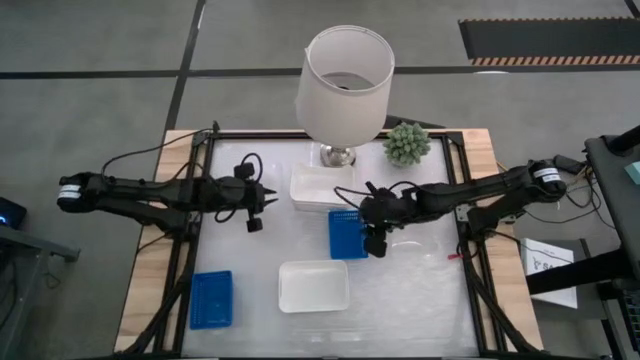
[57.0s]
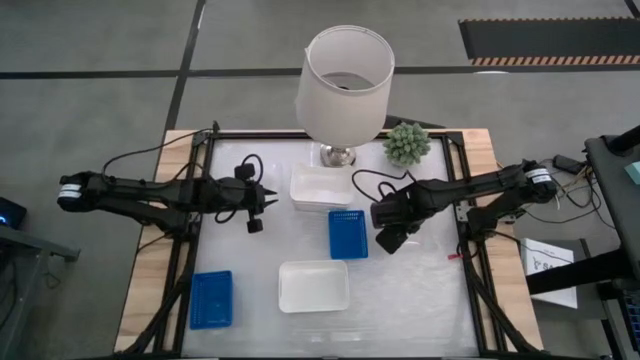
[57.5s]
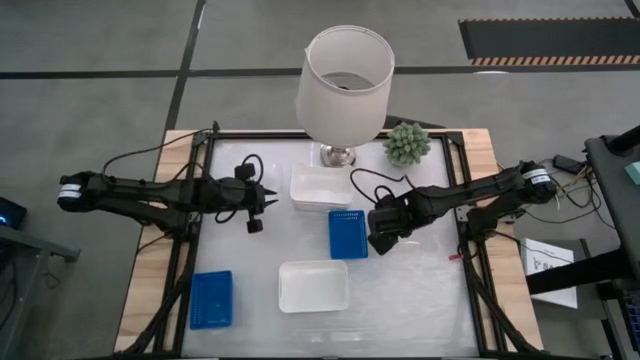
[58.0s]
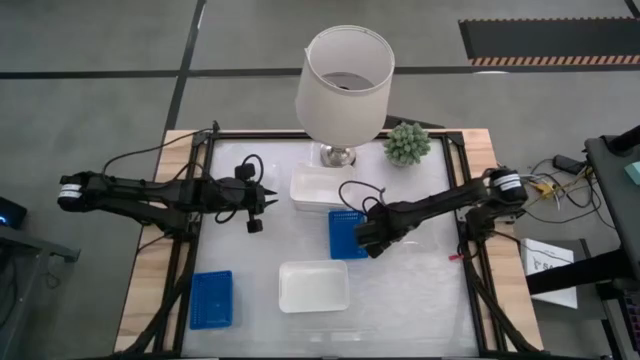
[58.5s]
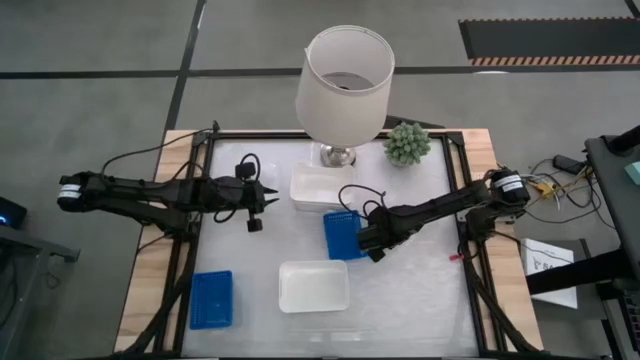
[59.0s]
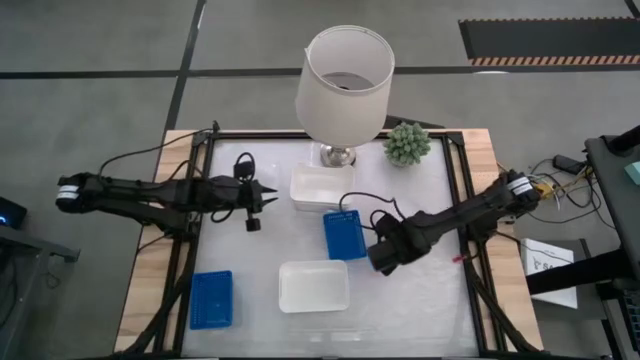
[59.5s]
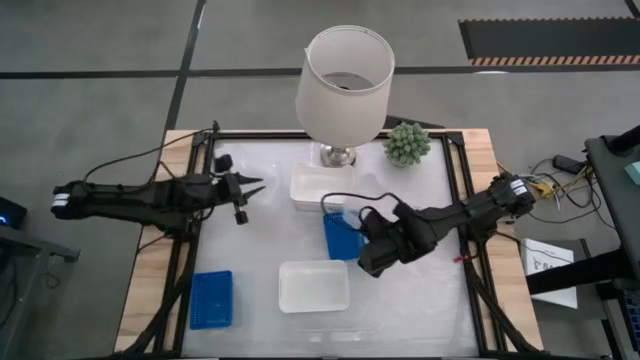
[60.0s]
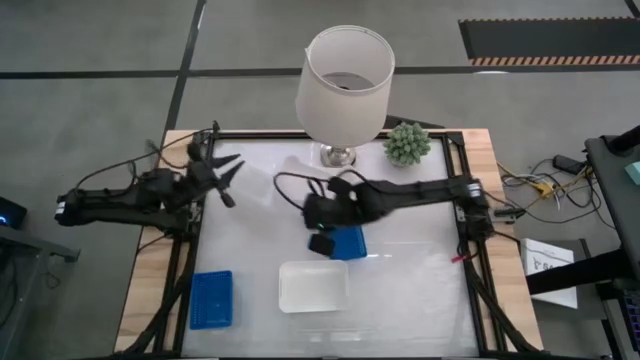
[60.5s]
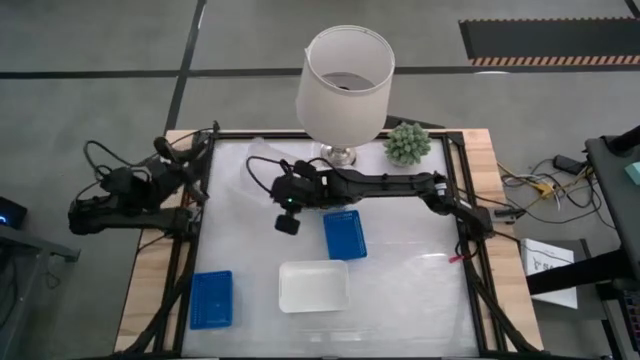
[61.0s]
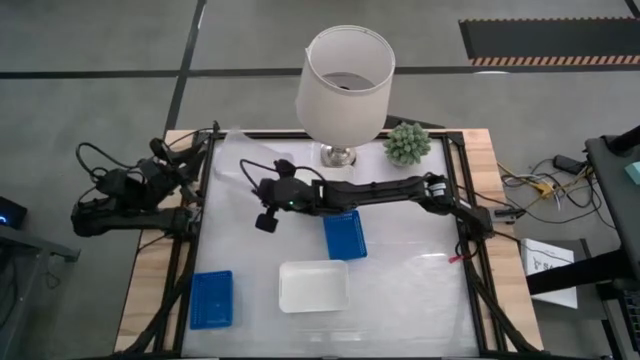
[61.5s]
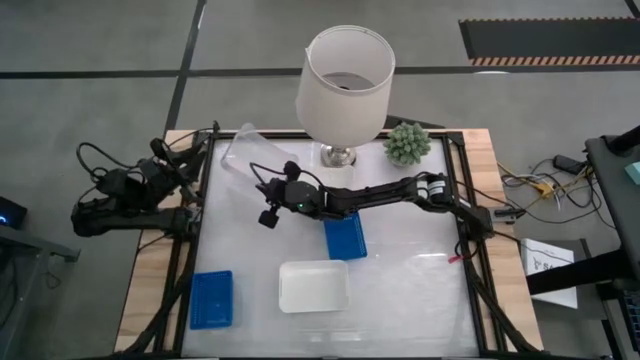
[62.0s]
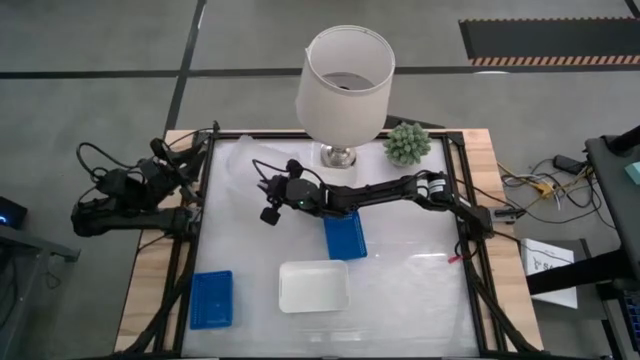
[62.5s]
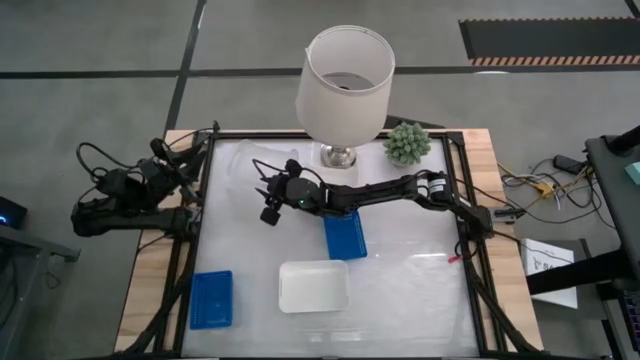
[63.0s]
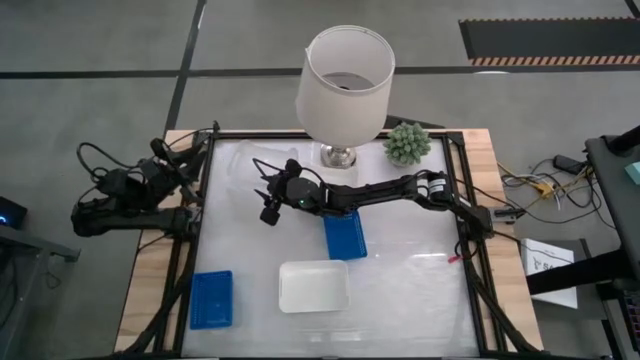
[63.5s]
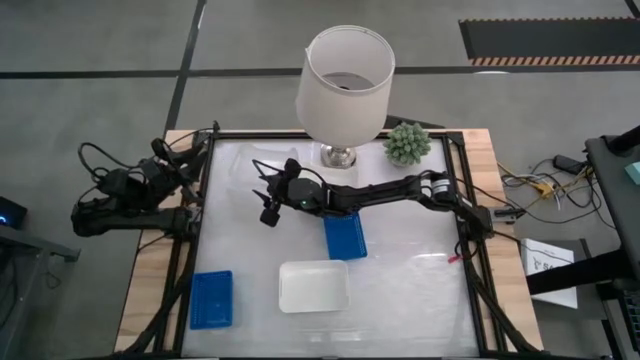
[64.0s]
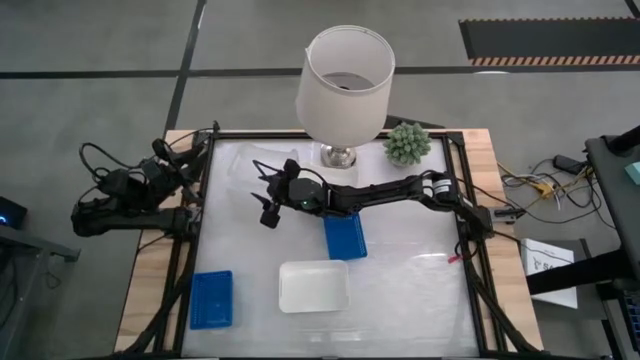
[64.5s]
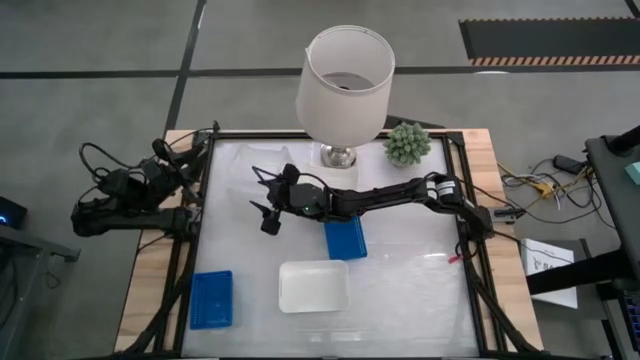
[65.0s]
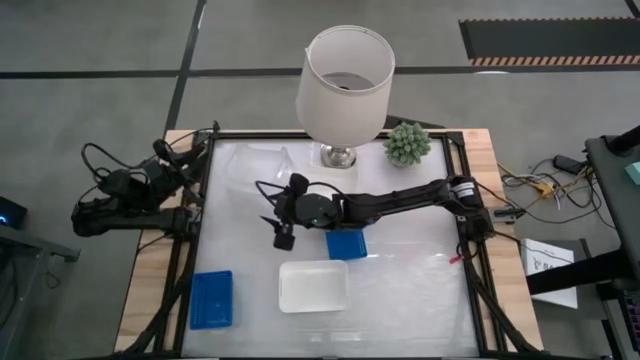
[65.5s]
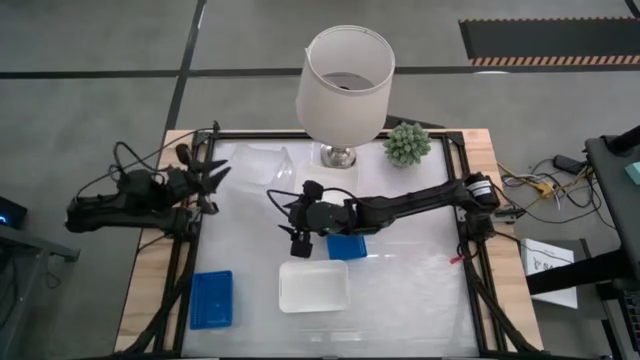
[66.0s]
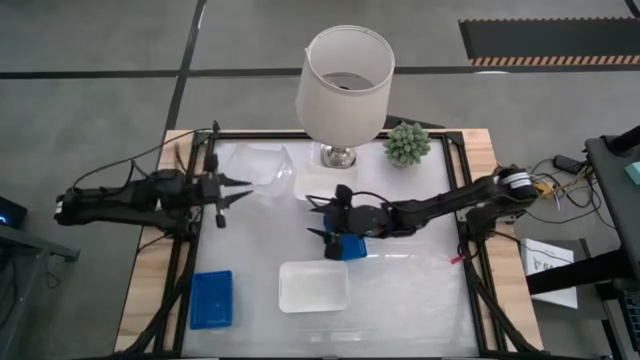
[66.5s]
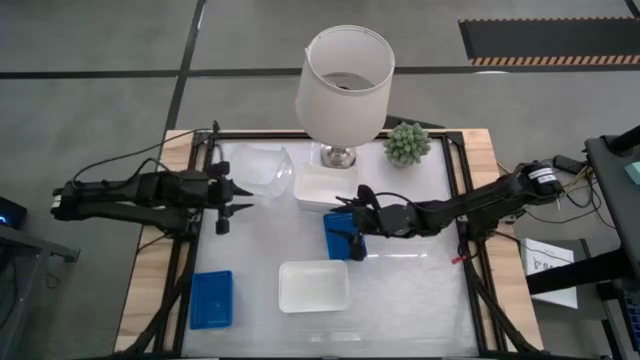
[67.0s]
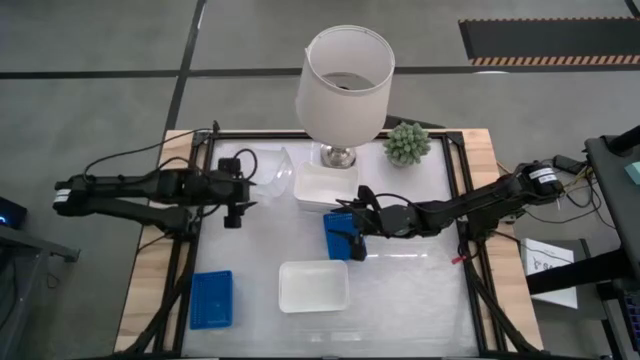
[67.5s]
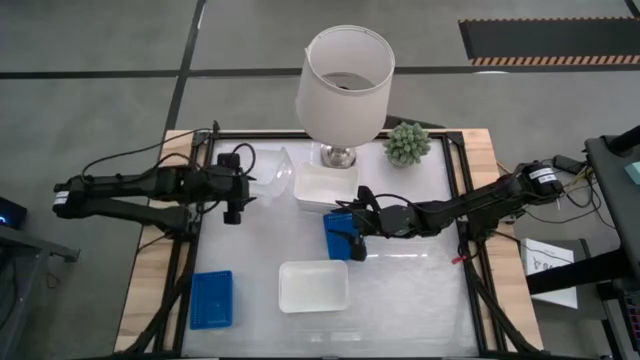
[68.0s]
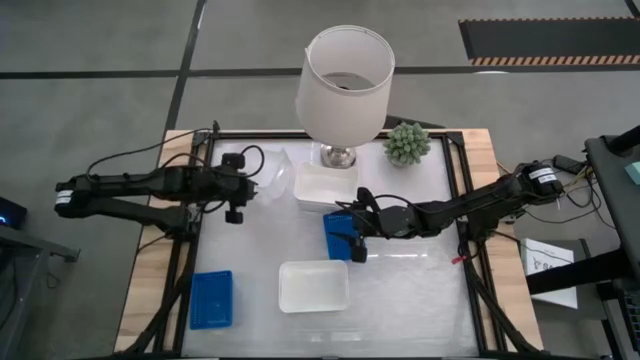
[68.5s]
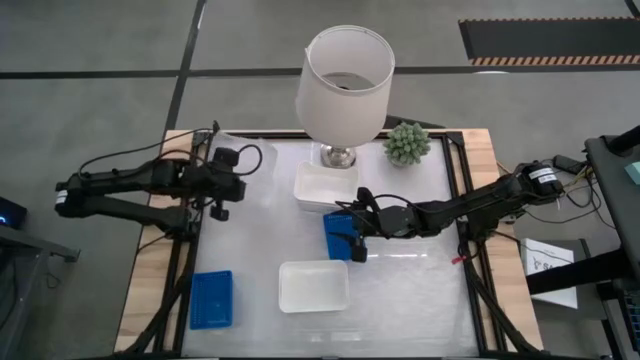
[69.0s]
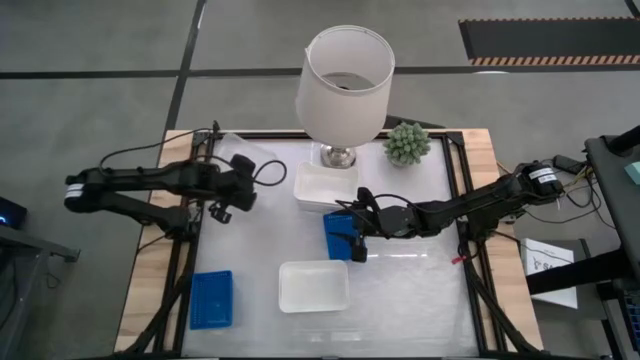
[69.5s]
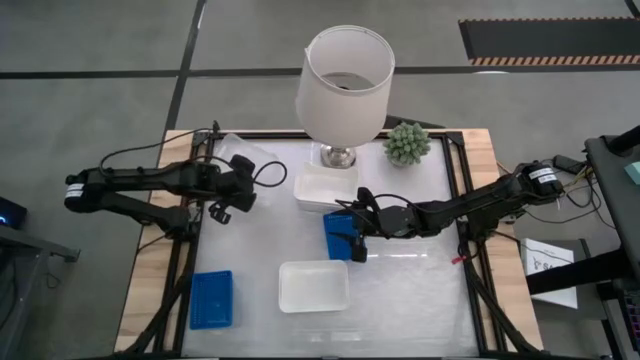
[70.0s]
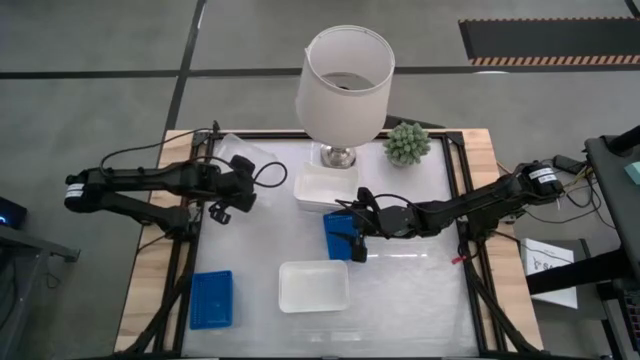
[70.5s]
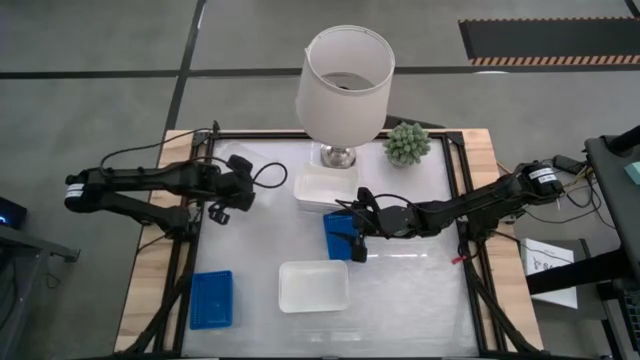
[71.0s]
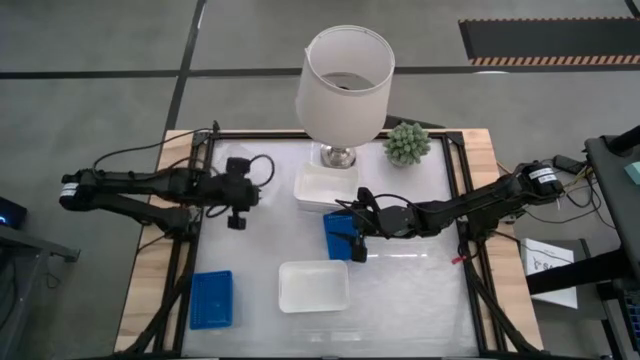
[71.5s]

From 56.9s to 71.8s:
Stack the transparent bin into the upper left transparent bin
